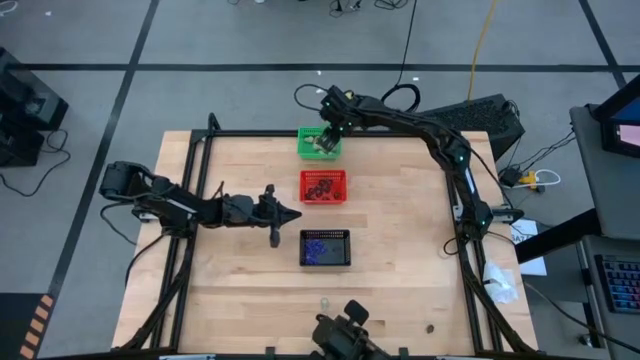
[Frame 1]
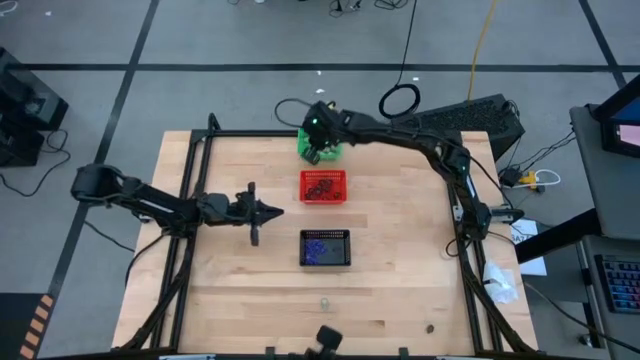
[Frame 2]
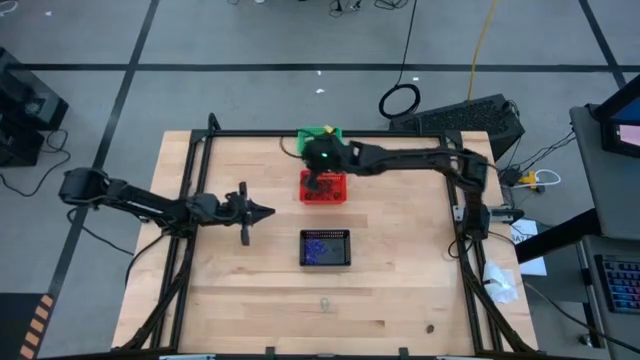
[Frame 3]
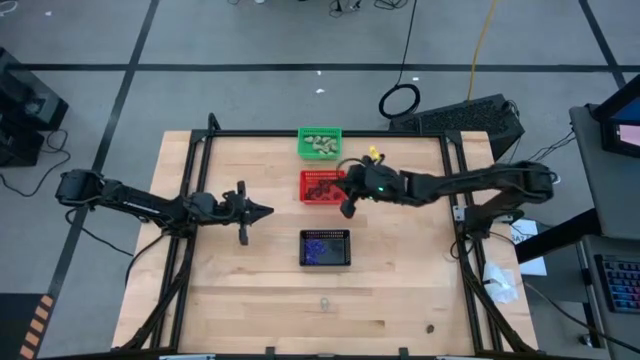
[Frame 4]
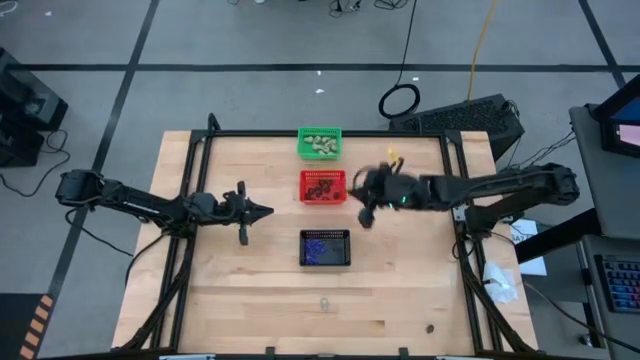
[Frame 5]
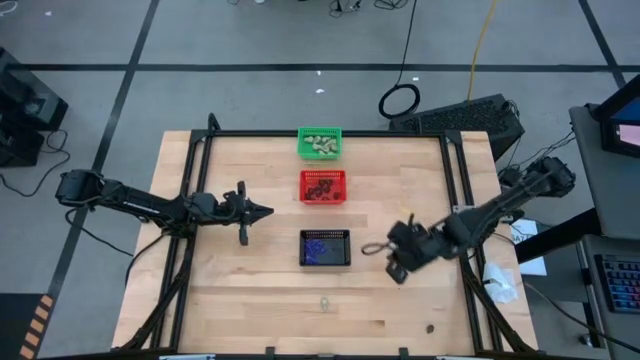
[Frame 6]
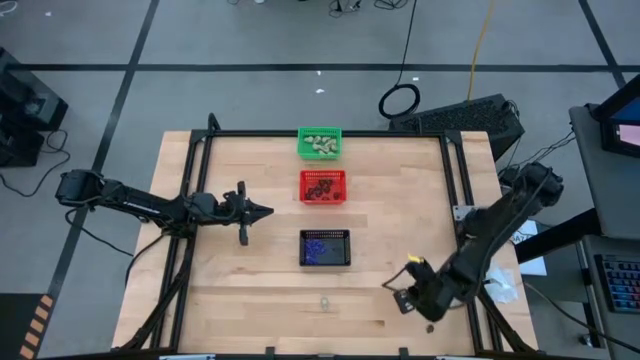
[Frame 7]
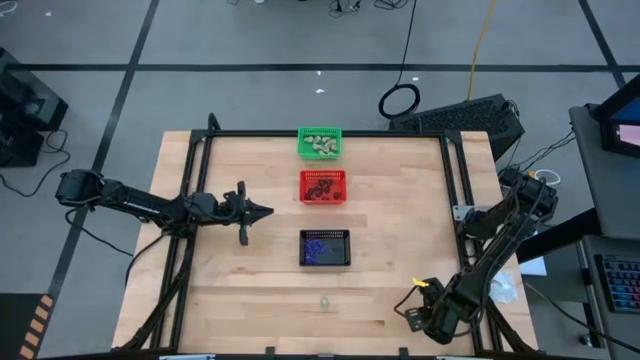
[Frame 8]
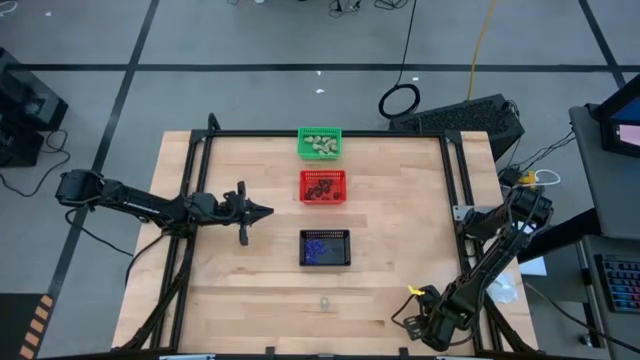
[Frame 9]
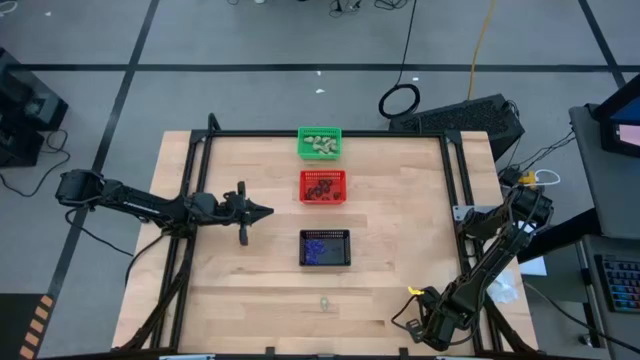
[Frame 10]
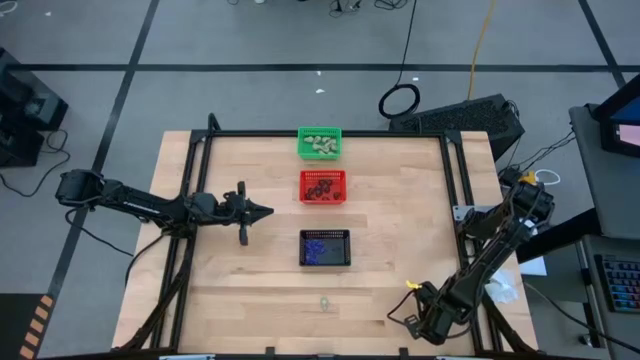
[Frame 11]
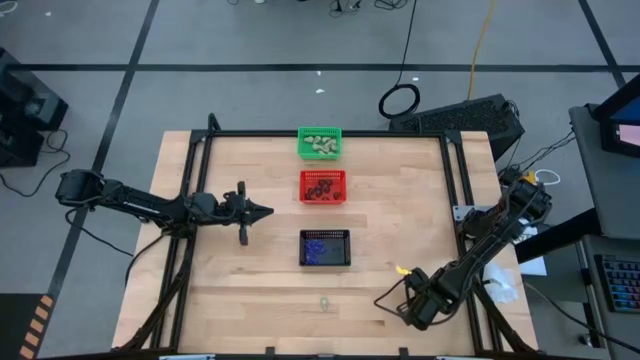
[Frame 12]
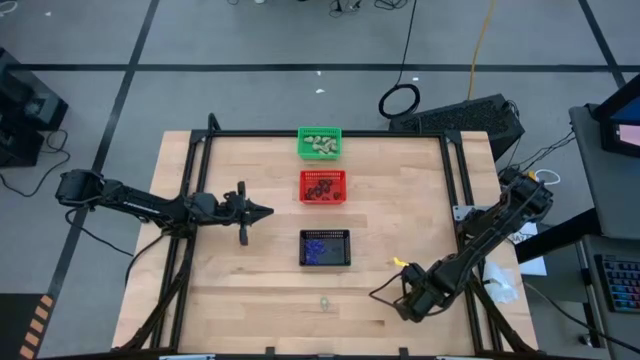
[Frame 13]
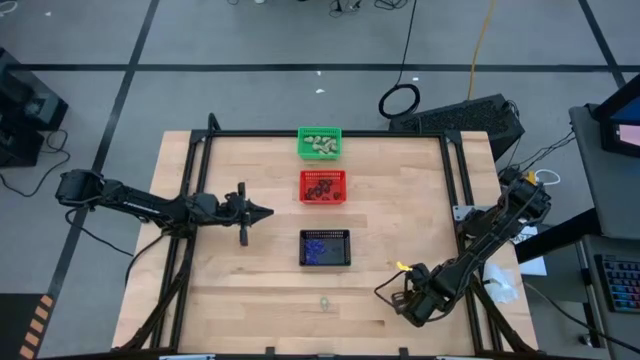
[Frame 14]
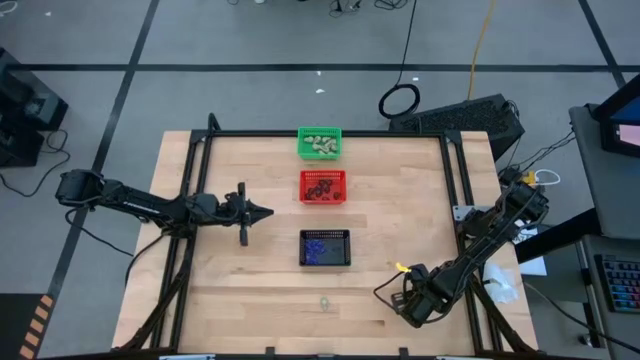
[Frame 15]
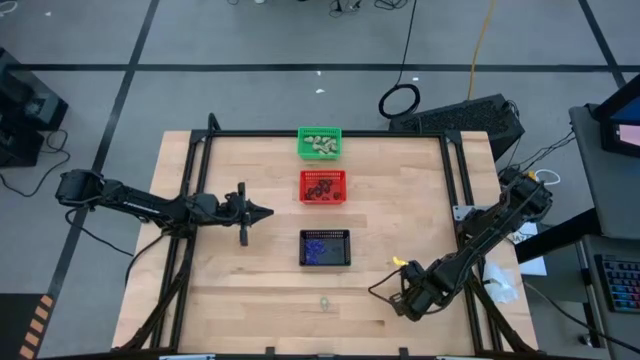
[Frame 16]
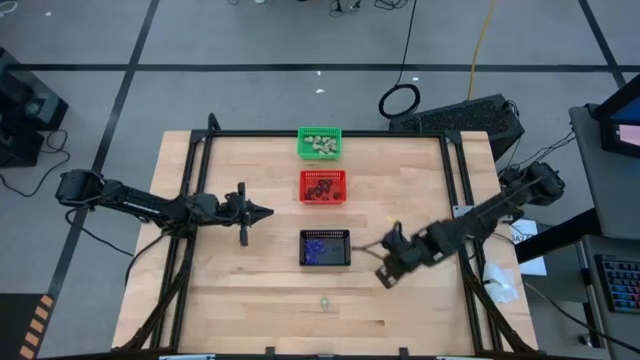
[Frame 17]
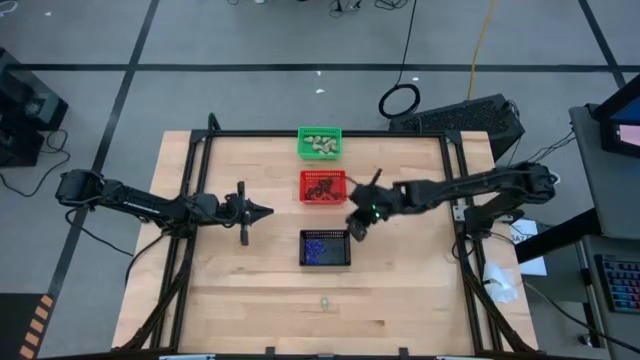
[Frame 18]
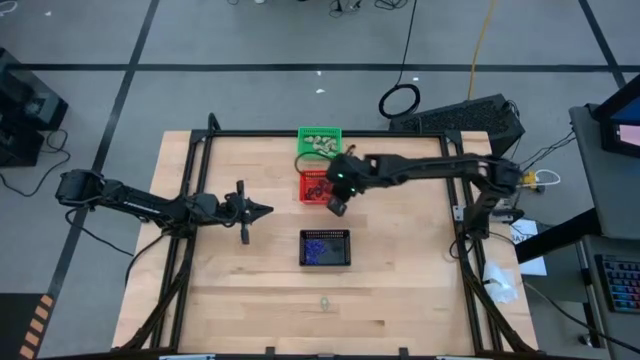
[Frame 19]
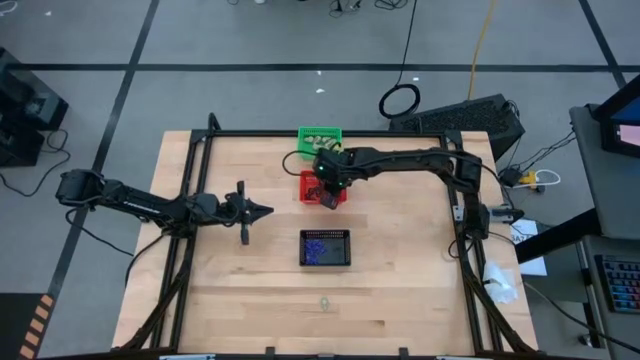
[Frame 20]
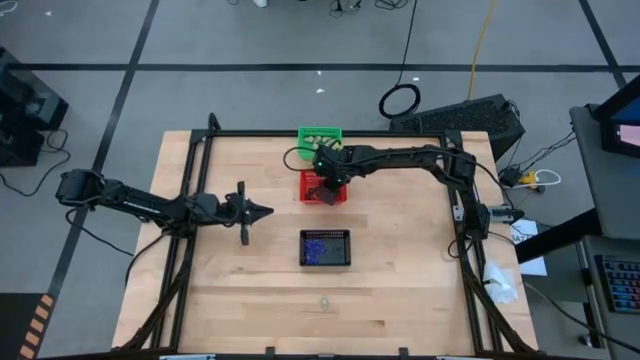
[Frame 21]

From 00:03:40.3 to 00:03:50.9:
Task: Sort Halloween decoration
Put the black skull toy into the red basket

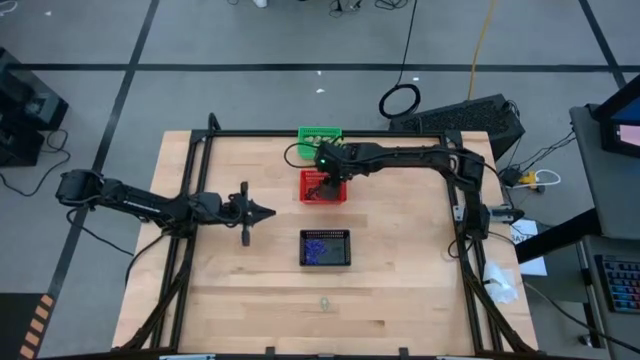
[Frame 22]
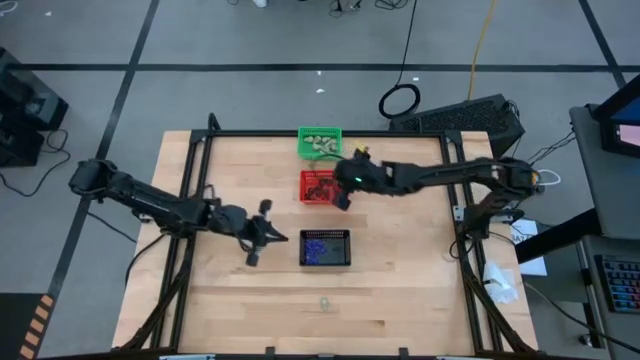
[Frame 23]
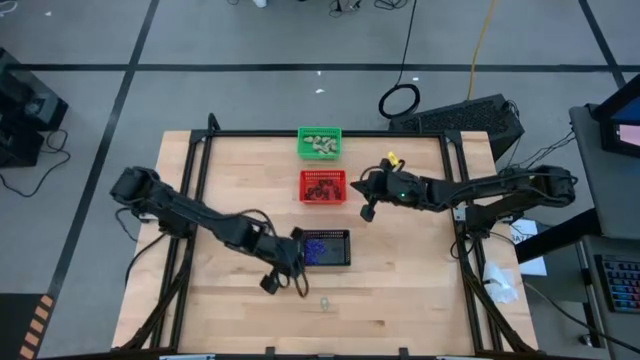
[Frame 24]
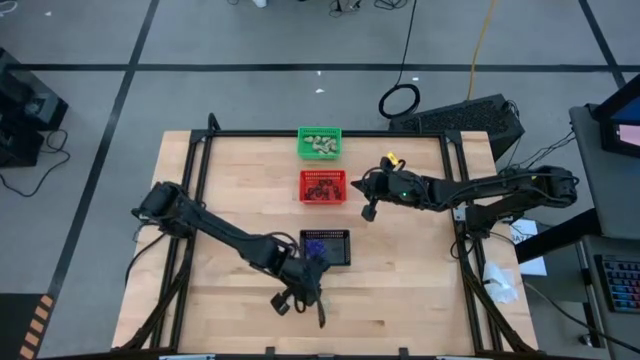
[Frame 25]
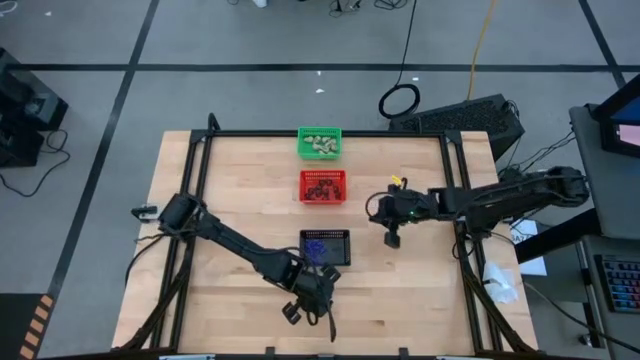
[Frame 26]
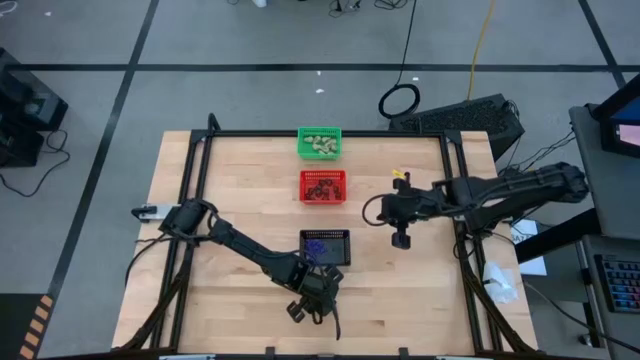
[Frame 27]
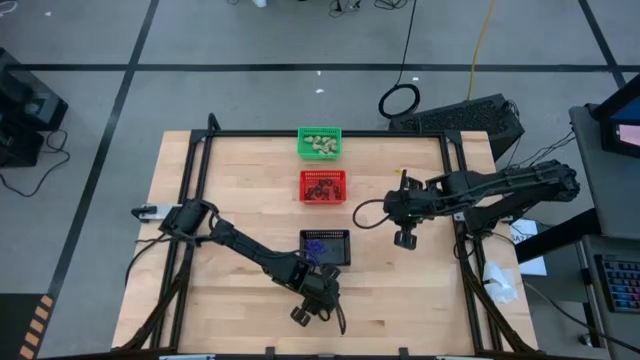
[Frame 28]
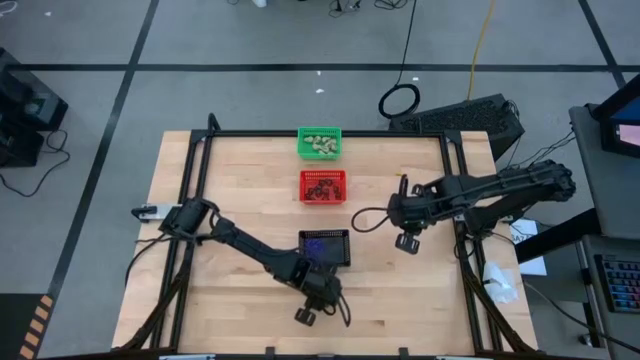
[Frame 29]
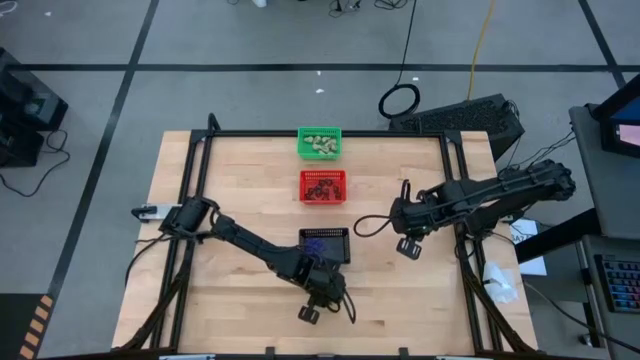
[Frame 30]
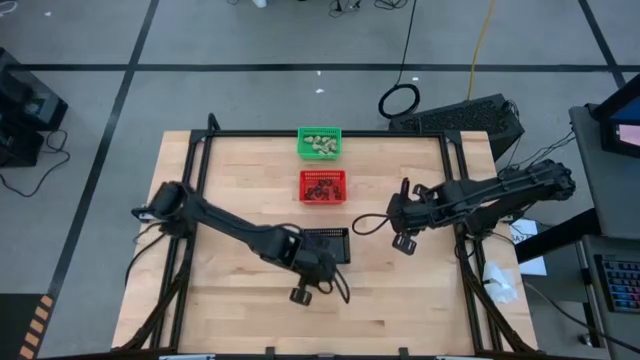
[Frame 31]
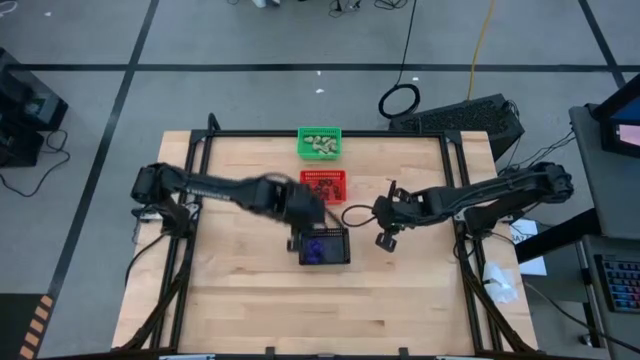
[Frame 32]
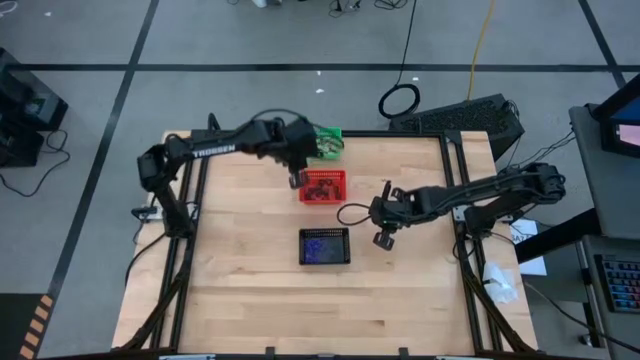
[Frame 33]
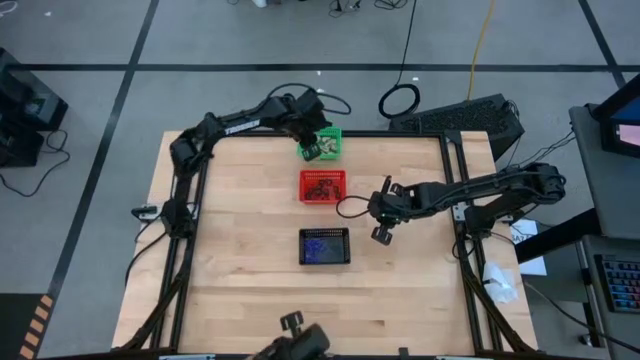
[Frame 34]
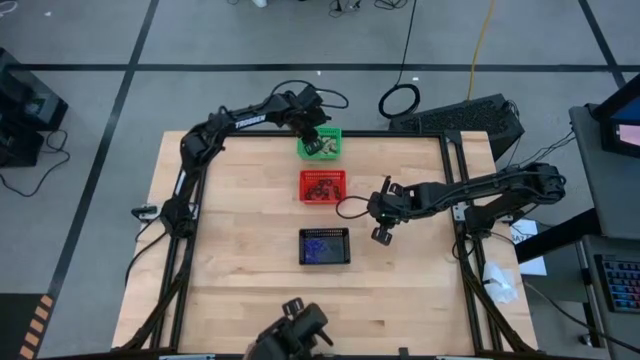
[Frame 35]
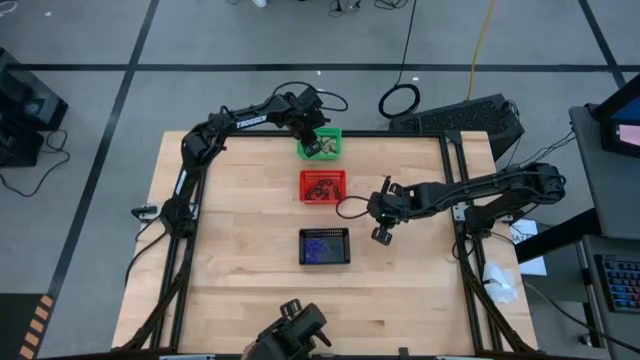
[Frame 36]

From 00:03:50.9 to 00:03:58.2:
Put the white skull toy into the green basket

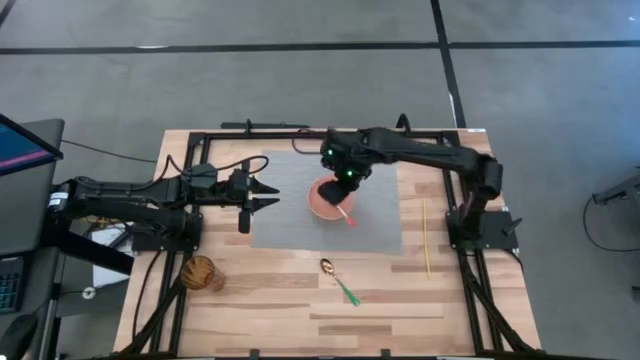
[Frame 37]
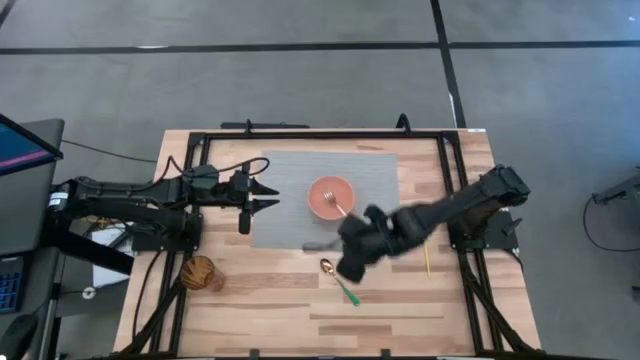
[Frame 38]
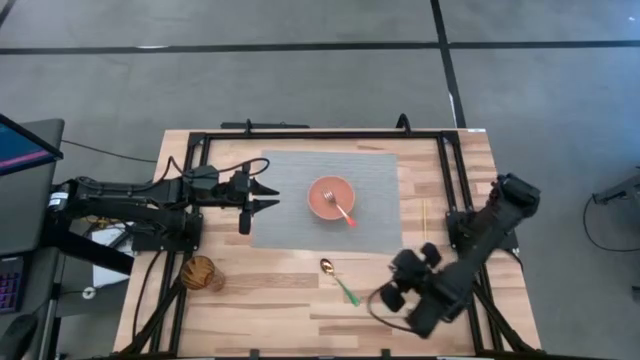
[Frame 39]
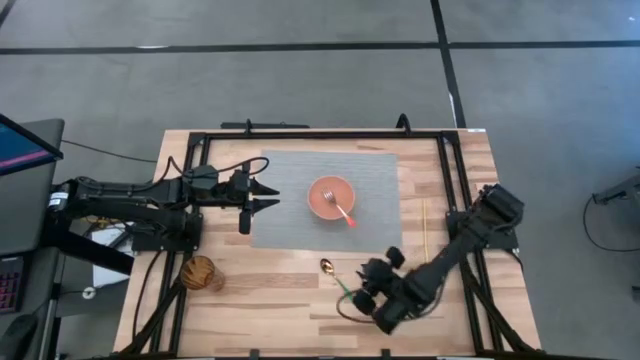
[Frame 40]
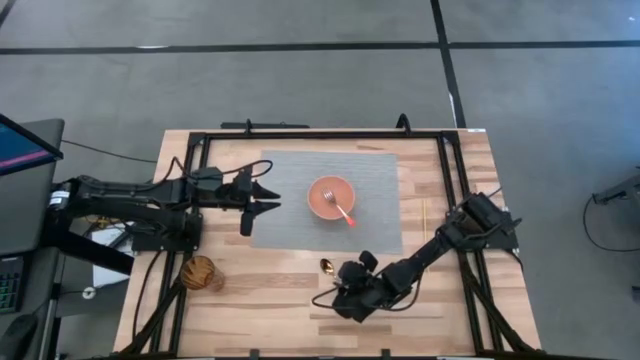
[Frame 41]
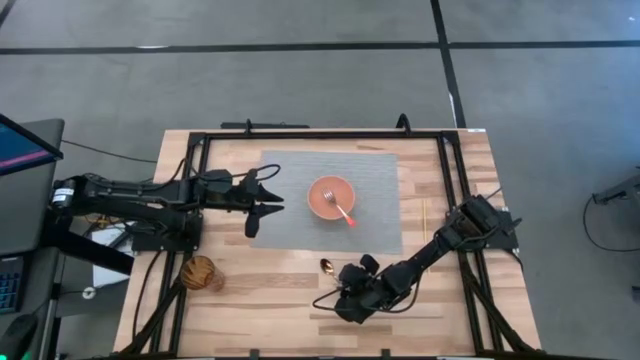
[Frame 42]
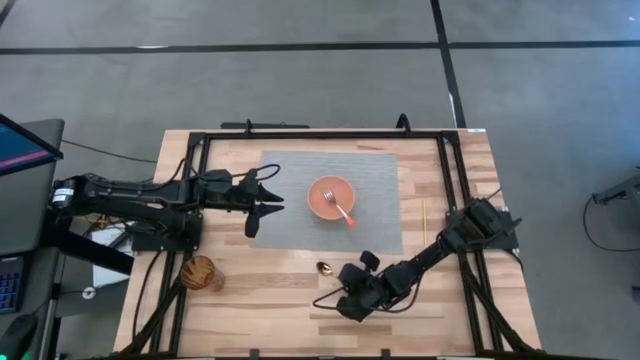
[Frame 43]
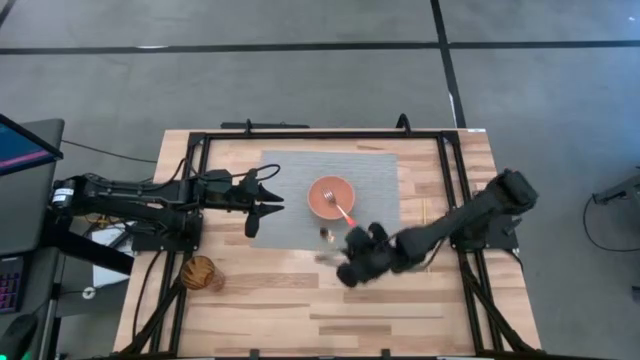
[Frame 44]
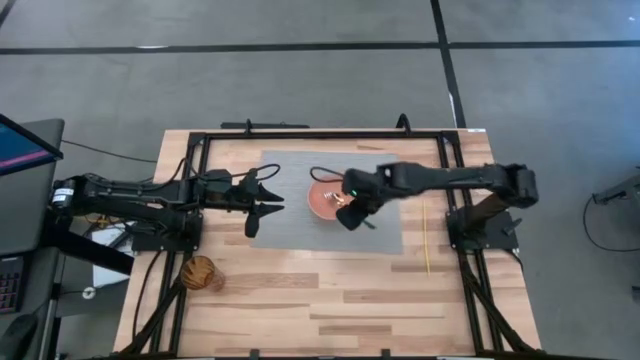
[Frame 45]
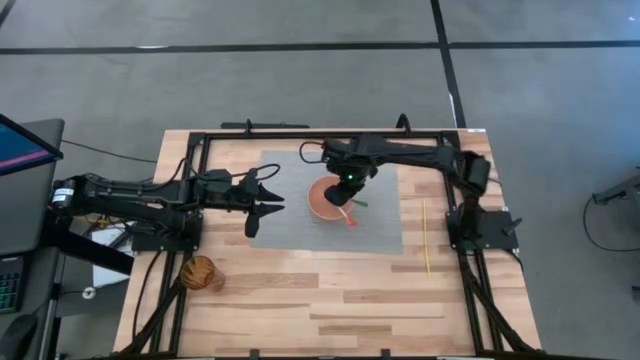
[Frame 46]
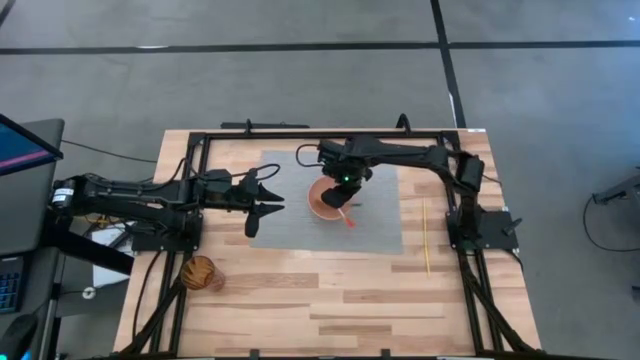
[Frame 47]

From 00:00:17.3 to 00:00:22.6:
Task: Pick & Place Utensil
Put the green spoon into the orange bowl on the gray mat
